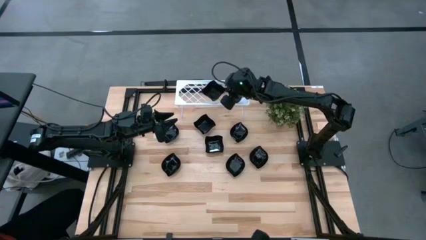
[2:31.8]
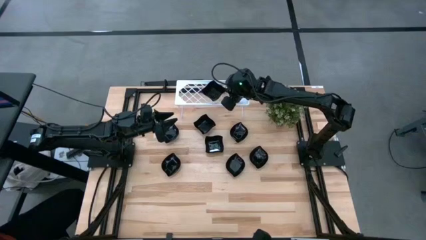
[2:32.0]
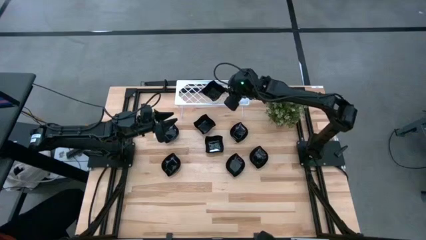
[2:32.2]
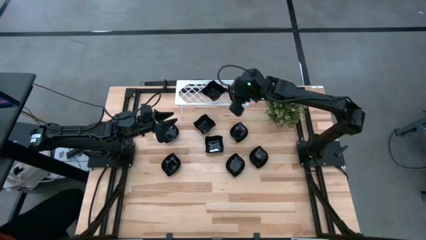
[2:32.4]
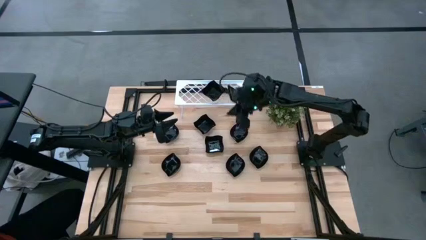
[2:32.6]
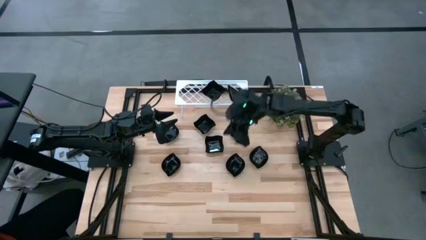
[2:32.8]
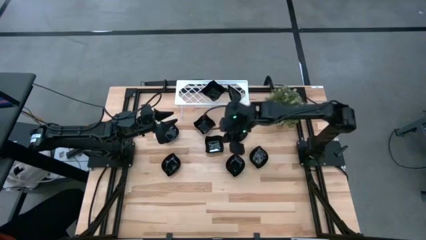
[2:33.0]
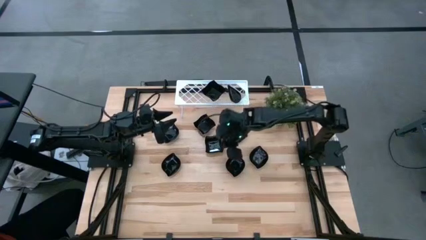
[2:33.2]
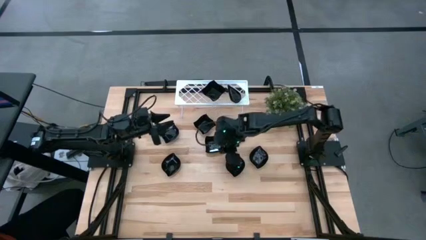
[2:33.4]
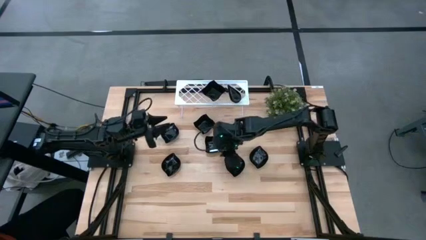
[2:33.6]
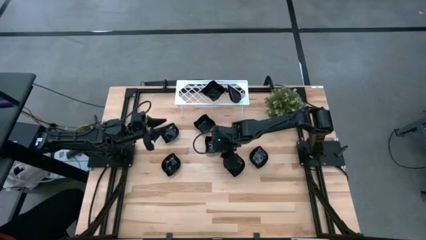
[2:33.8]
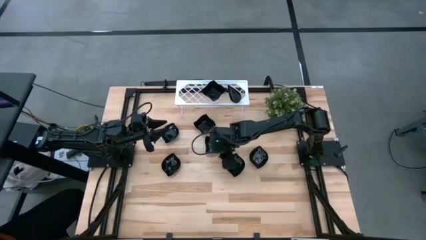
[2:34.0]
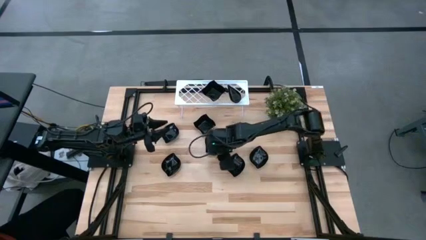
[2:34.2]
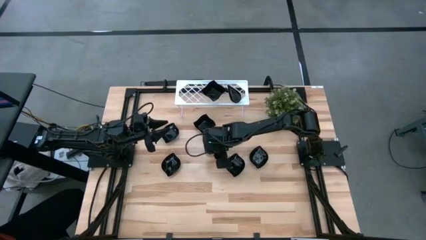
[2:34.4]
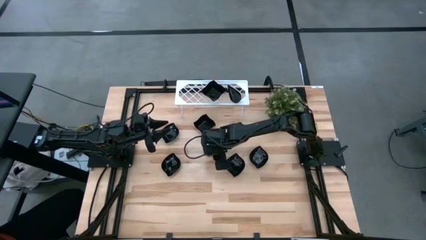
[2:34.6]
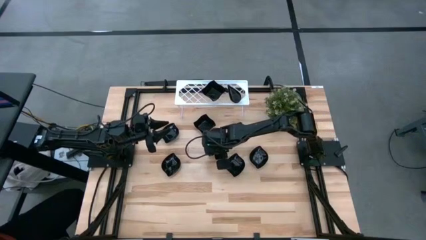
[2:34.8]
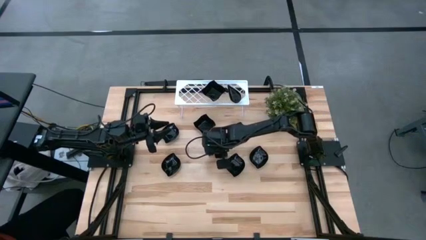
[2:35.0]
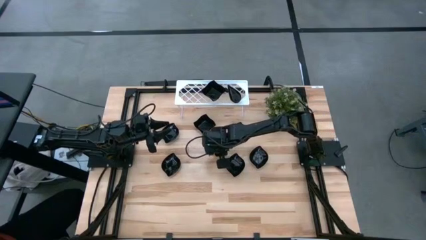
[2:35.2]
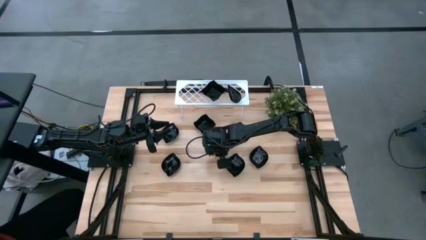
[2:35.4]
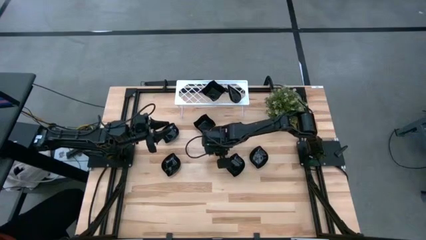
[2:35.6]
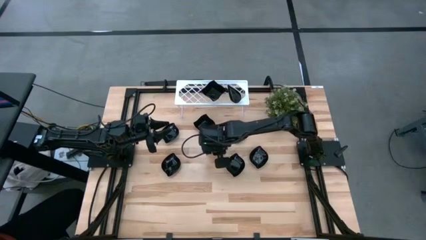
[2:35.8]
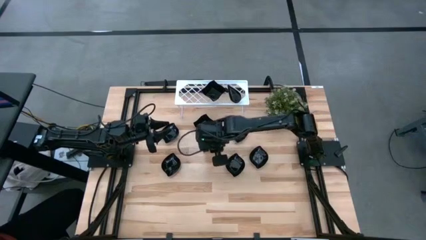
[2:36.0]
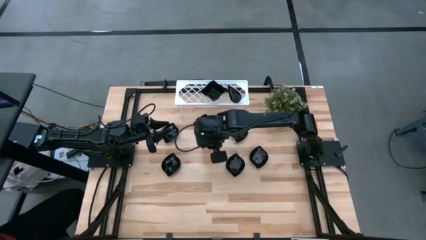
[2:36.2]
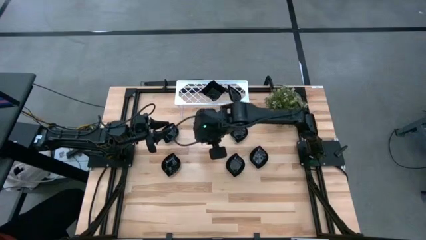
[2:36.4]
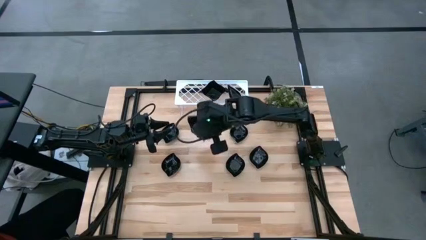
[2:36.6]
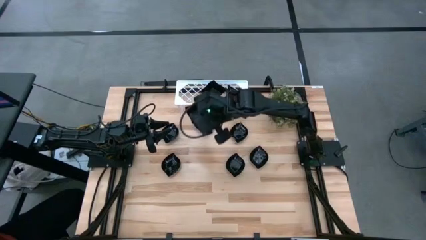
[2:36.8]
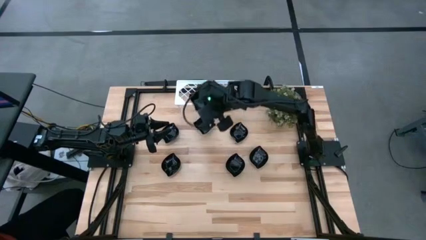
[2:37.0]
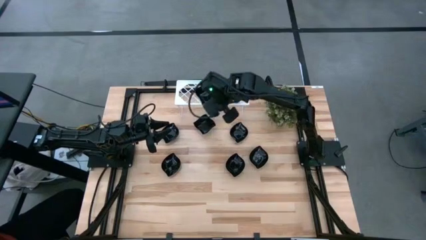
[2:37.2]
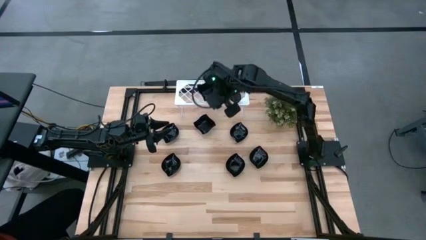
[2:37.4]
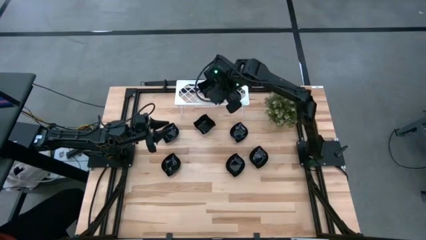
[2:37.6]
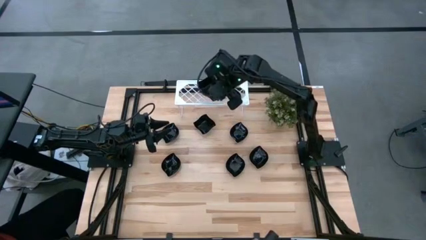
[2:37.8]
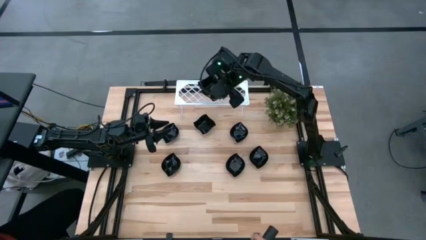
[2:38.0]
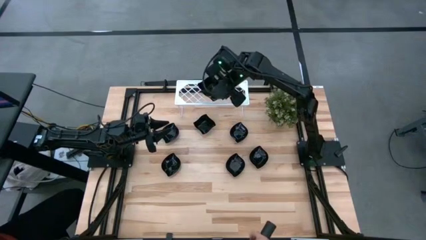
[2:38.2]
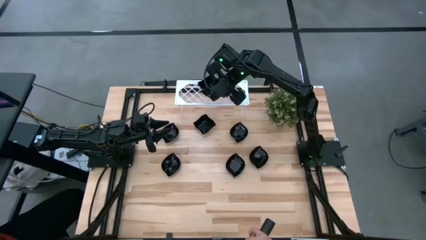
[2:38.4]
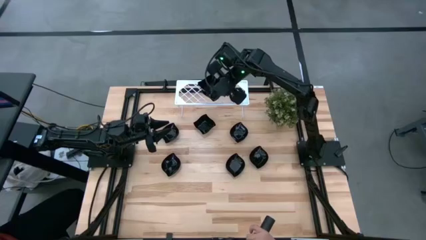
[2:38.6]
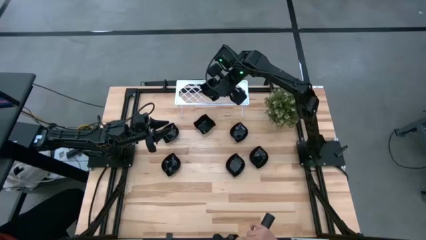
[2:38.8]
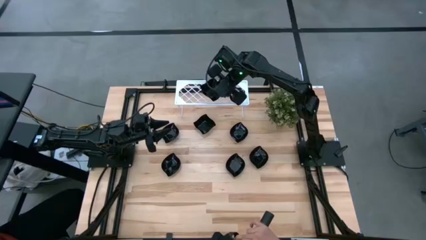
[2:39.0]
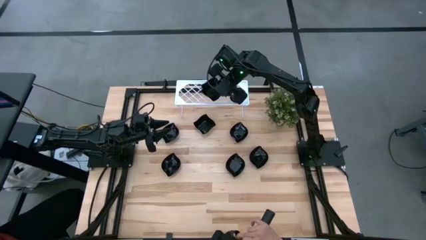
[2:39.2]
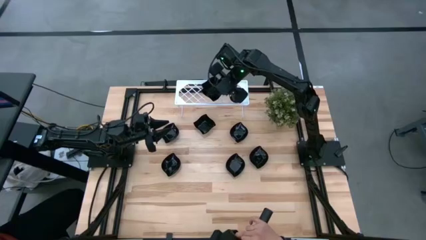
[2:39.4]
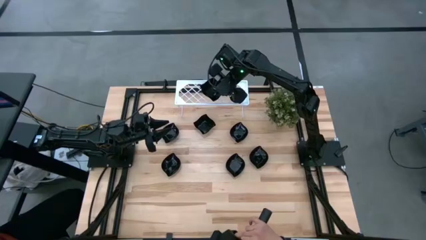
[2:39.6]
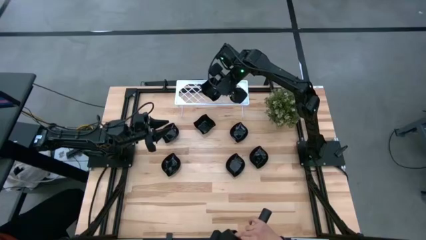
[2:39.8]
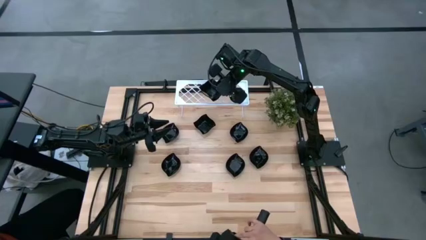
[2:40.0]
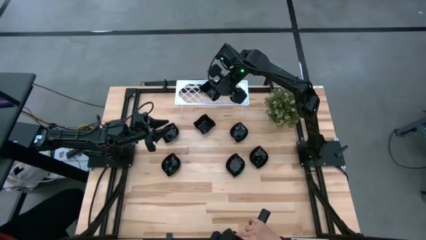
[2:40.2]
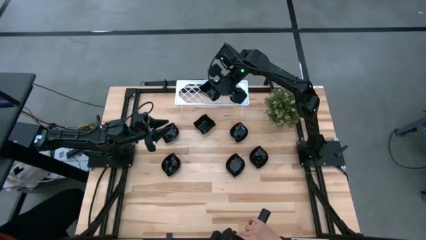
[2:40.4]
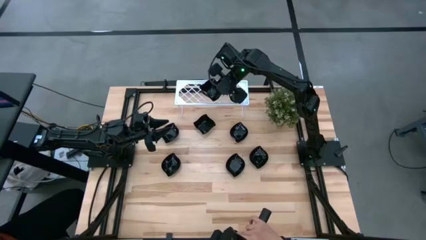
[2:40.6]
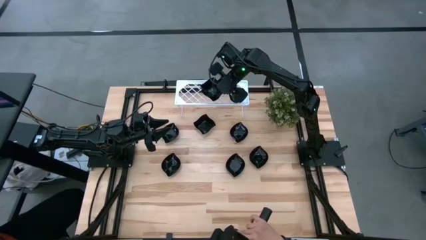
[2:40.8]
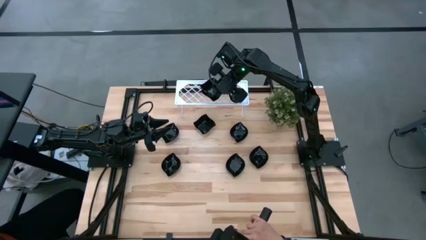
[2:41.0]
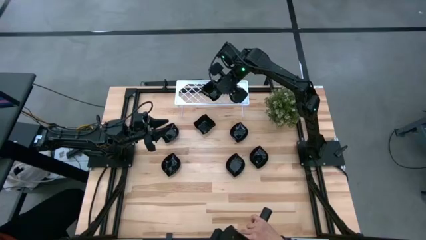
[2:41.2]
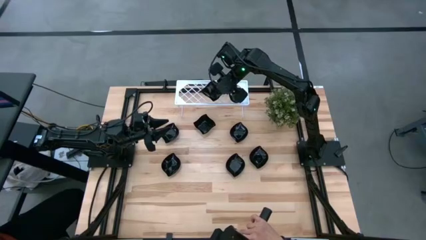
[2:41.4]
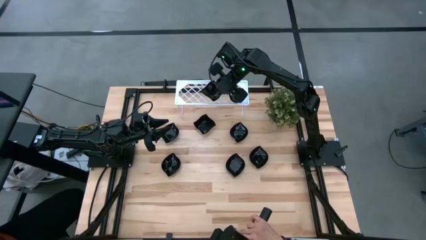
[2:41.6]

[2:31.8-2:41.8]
Task: Pick & Place Mini shaped plates
Stack the distorted square plate on top of the other distorted square plates on the shelf

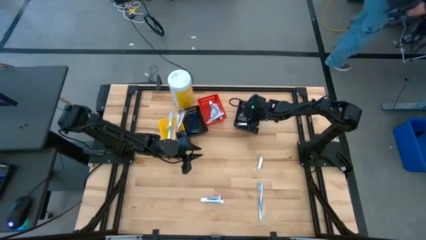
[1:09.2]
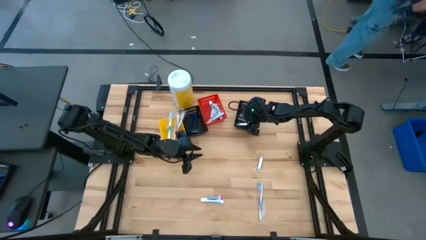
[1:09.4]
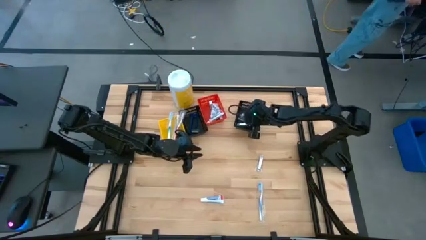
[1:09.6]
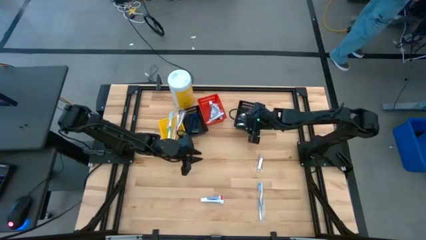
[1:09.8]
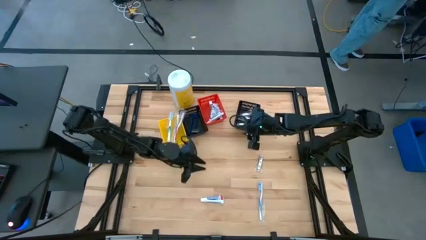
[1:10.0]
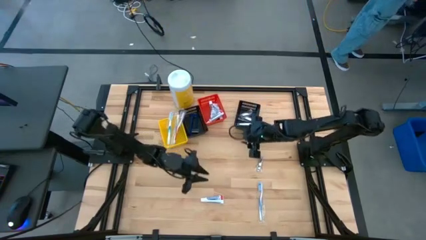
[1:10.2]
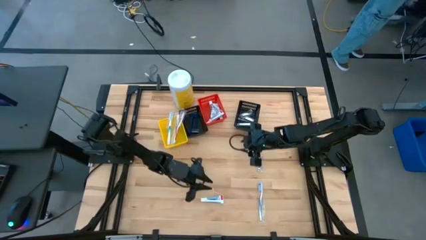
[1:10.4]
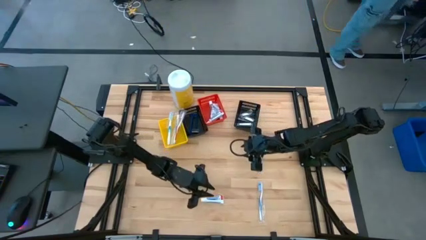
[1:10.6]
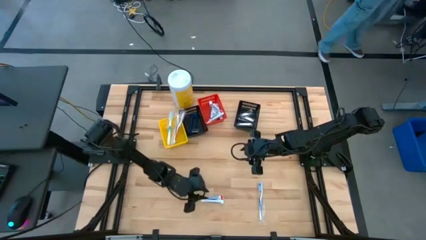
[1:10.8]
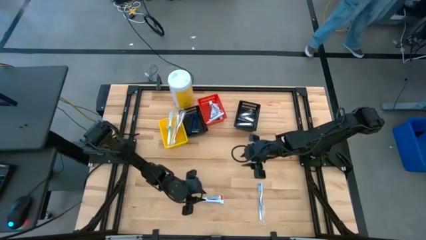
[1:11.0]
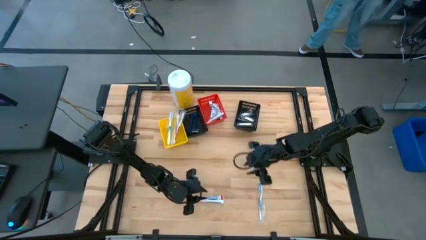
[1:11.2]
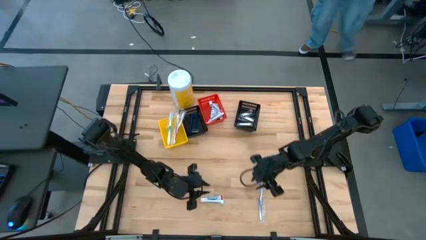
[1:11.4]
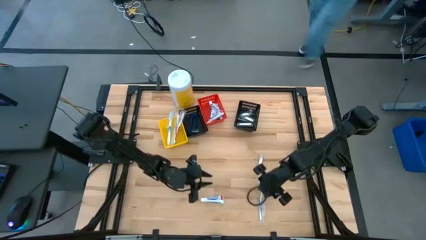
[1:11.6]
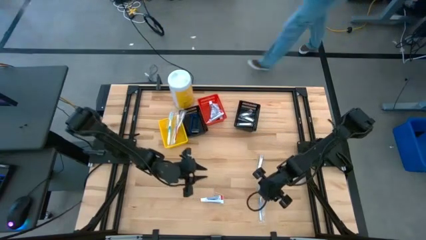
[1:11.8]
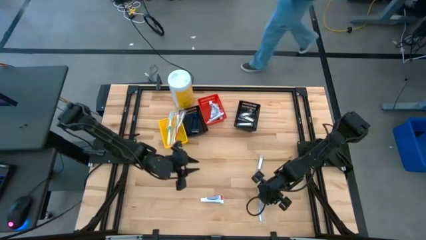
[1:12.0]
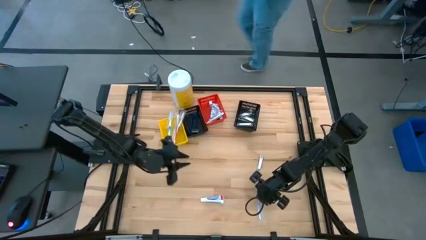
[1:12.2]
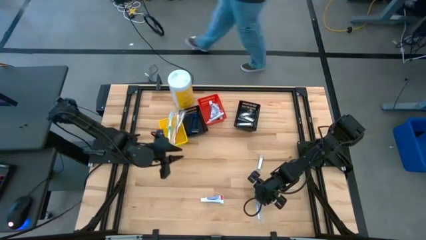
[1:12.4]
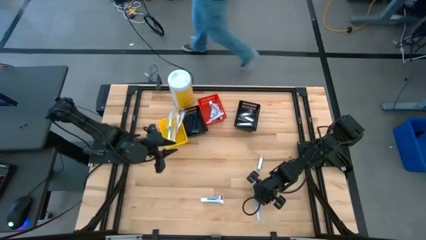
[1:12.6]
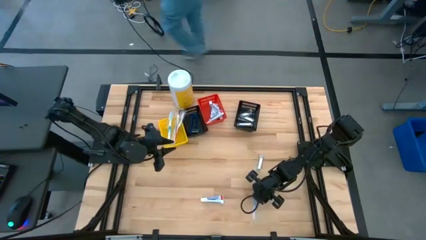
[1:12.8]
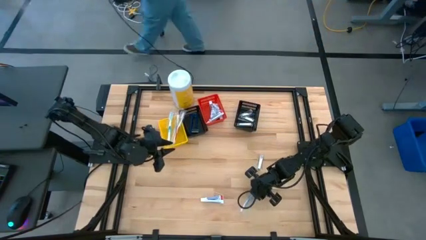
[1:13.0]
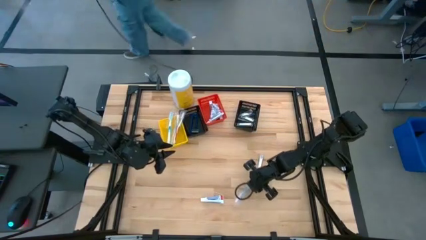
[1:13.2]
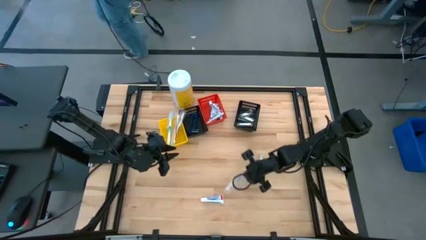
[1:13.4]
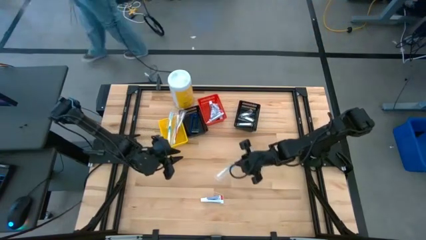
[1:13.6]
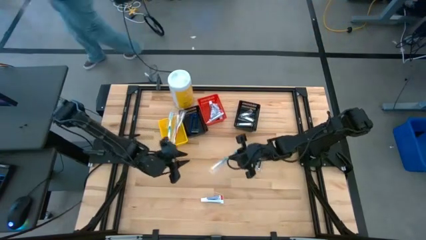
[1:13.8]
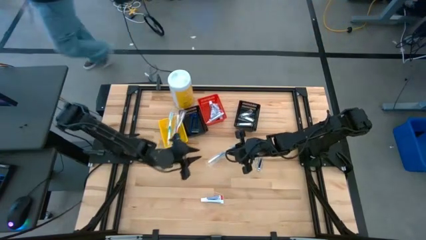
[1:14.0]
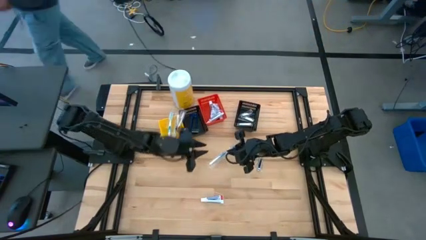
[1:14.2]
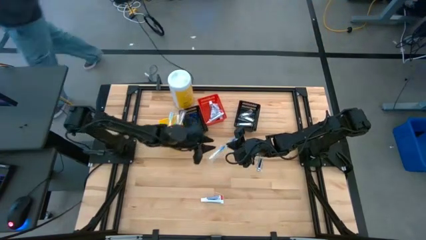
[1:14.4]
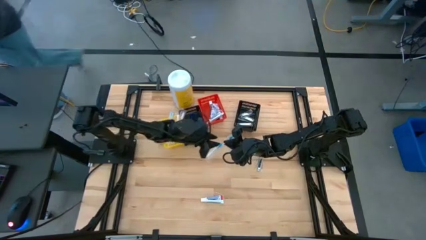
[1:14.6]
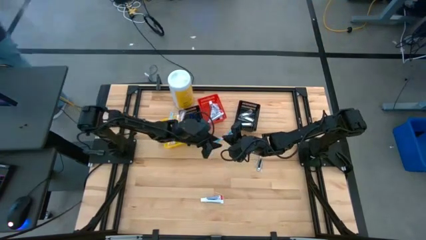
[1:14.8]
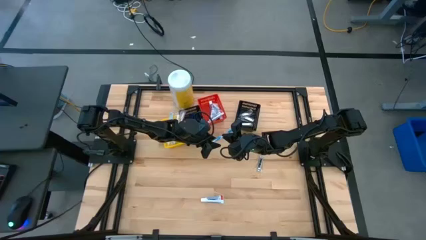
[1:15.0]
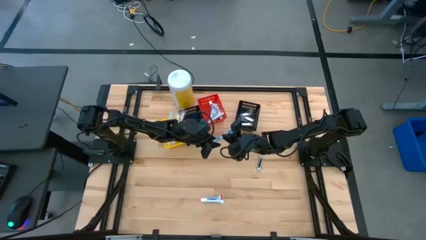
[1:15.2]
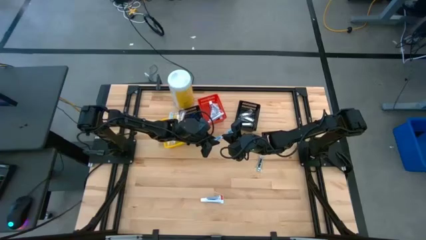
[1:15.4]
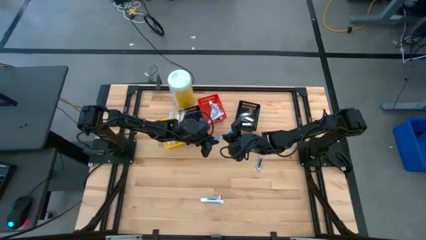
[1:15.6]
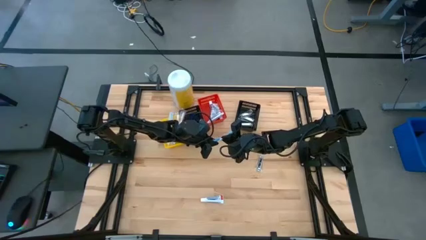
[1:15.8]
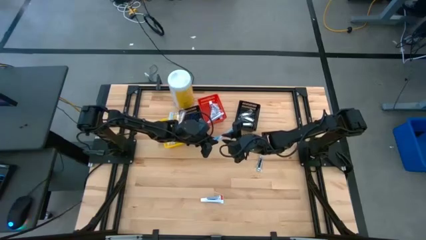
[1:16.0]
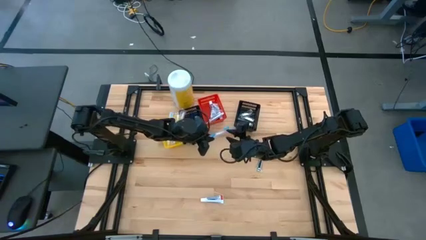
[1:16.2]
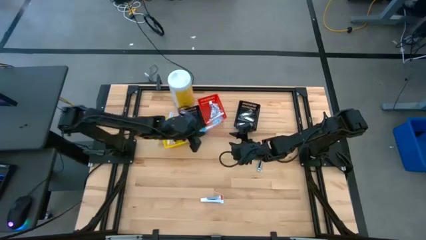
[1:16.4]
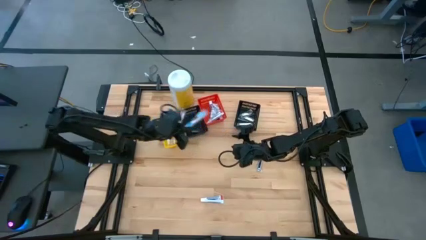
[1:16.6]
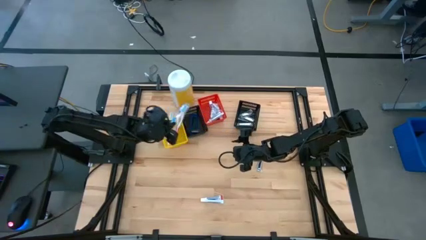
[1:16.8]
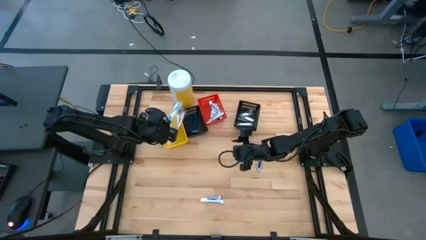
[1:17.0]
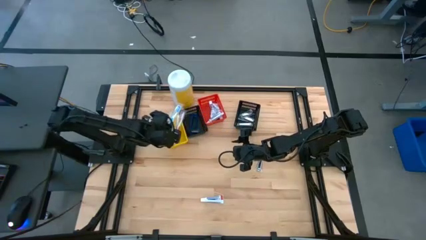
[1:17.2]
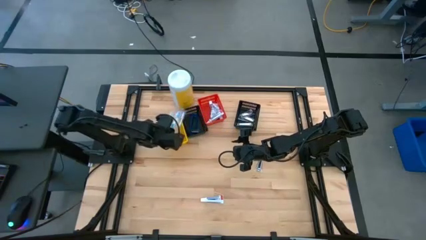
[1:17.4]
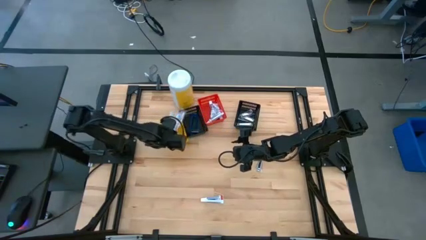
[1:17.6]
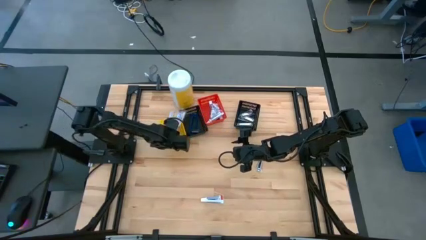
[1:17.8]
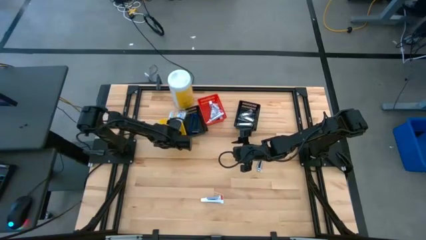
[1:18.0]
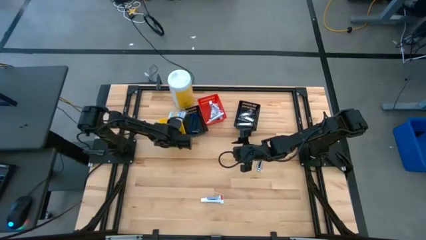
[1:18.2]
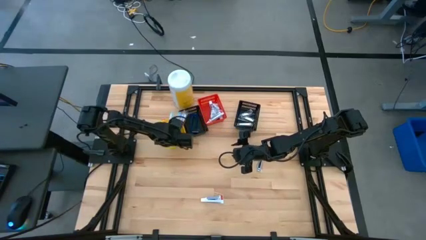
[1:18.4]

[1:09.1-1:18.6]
Task: Pick & Place Travel size toiletries
Put the blue toothbrush into the yellow bin
